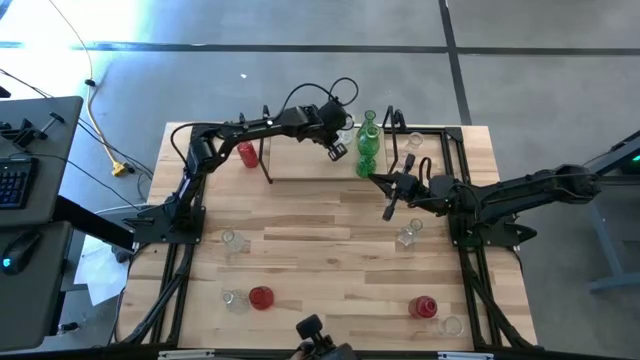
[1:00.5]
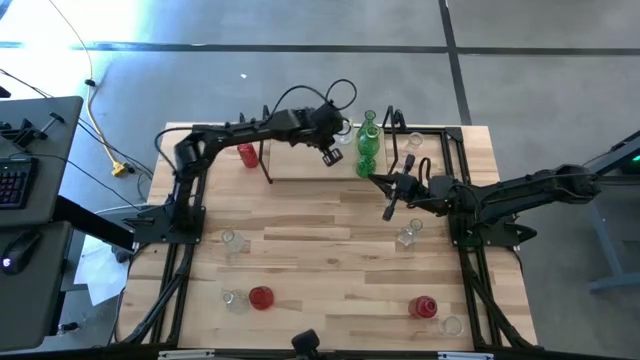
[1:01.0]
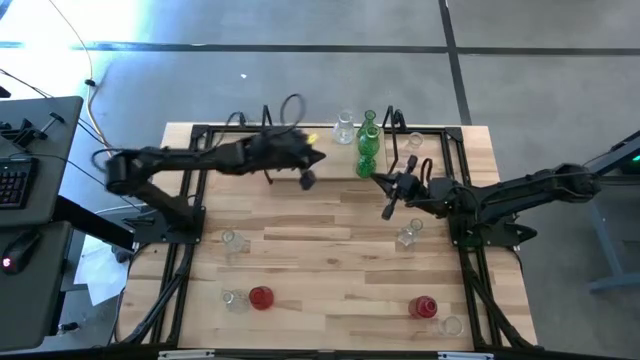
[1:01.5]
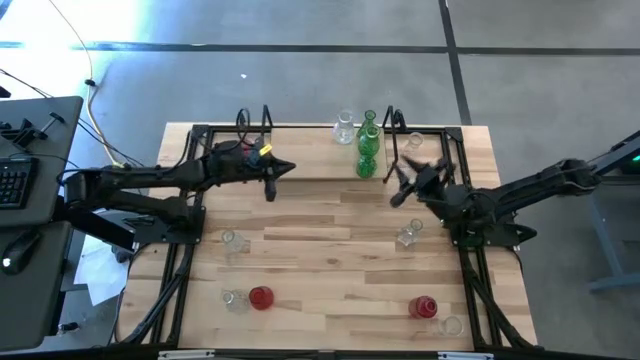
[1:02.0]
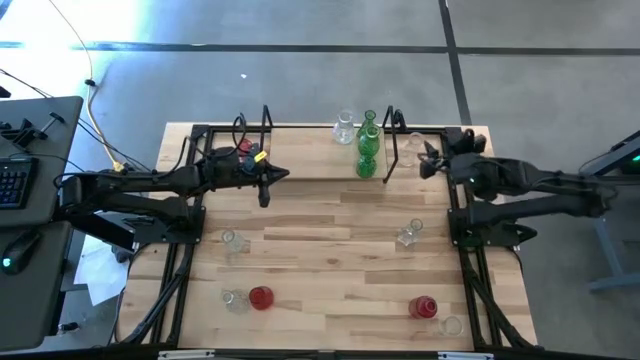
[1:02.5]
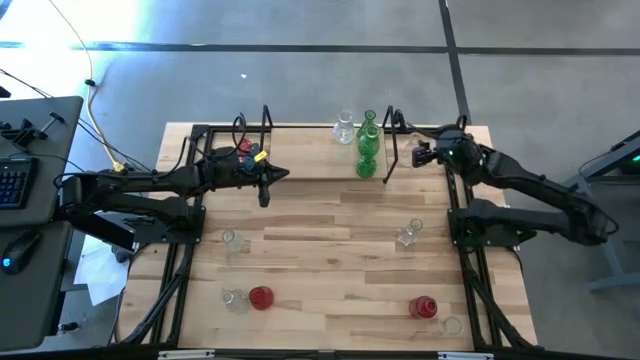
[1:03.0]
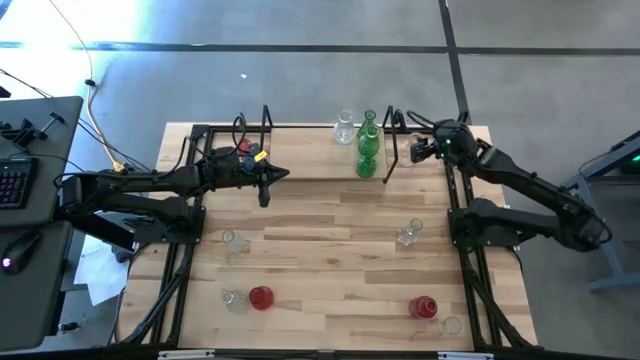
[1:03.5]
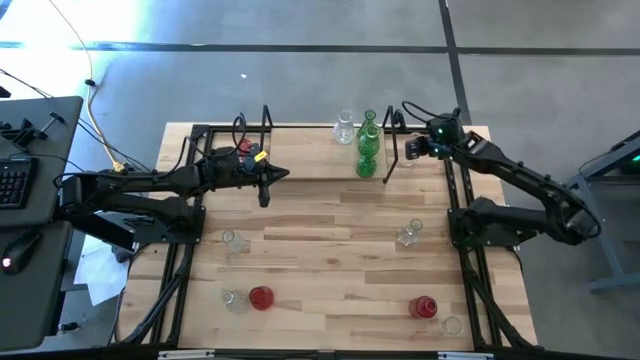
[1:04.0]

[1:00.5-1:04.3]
Task: sort vases onto shelf
Put the top right transparent vase on the shelf

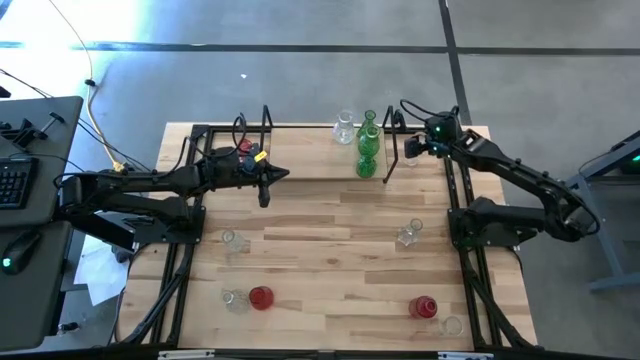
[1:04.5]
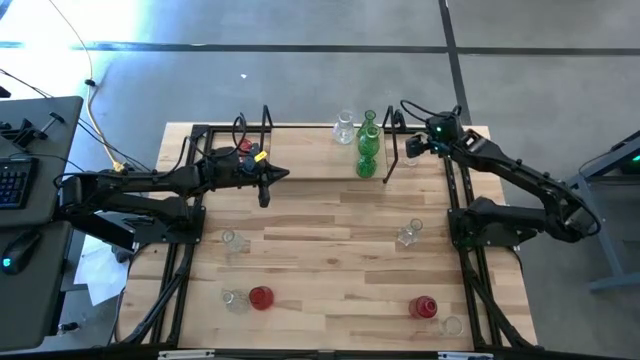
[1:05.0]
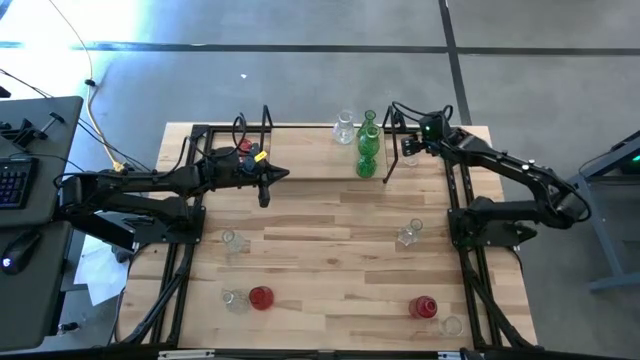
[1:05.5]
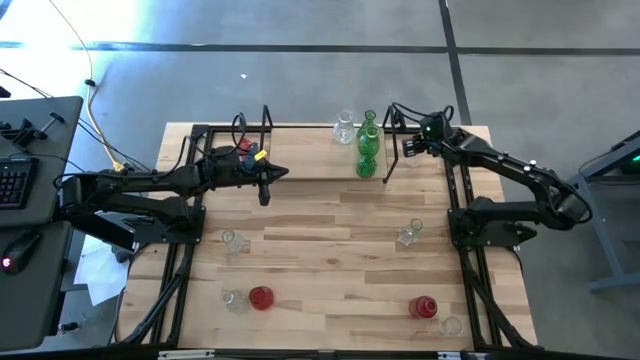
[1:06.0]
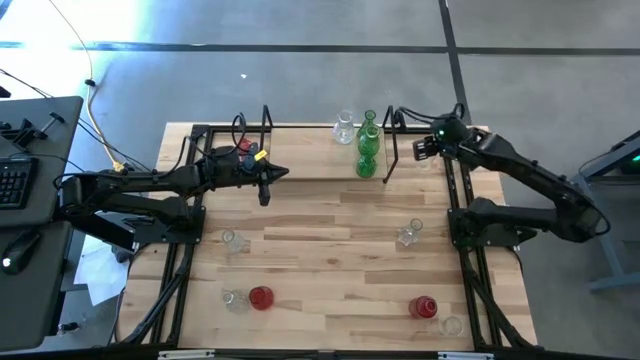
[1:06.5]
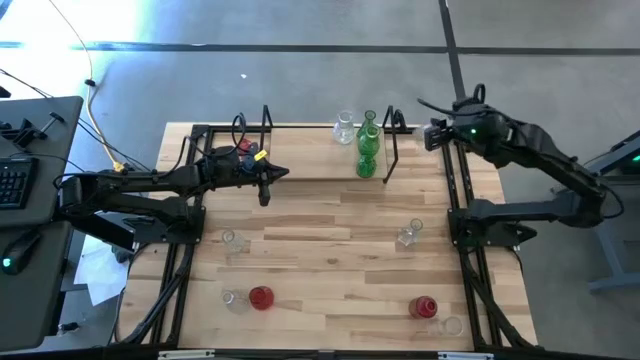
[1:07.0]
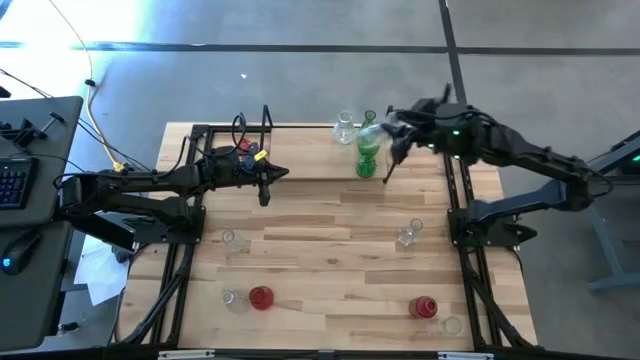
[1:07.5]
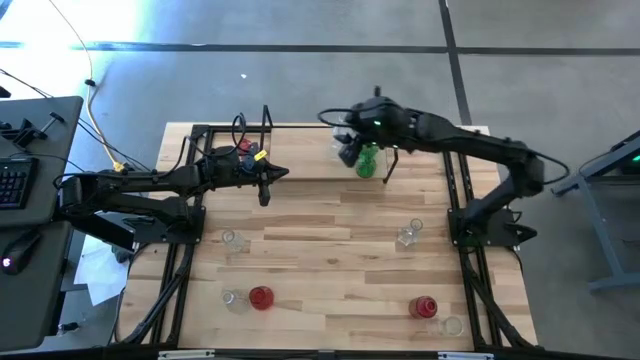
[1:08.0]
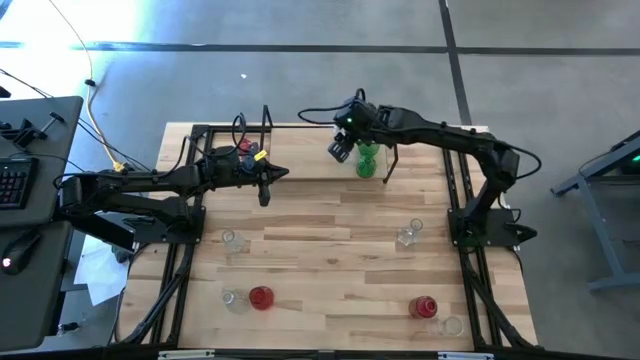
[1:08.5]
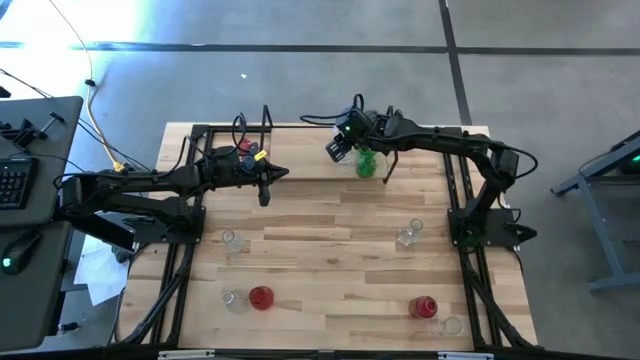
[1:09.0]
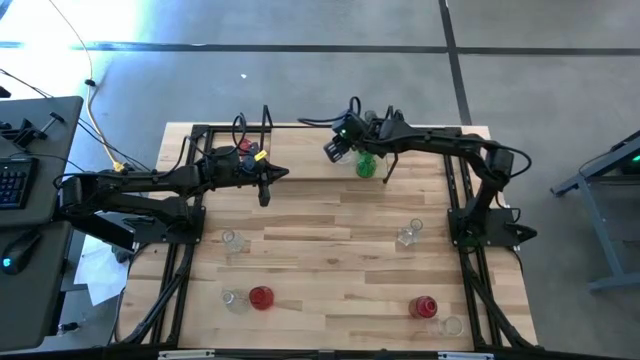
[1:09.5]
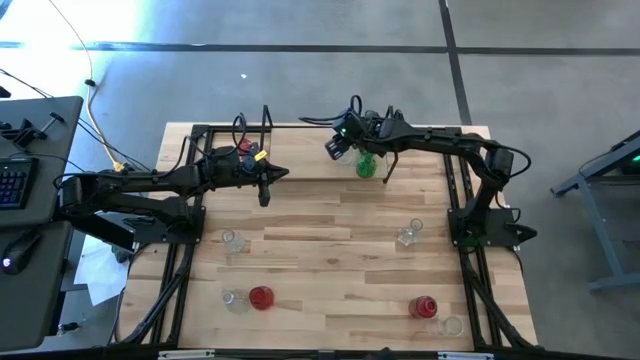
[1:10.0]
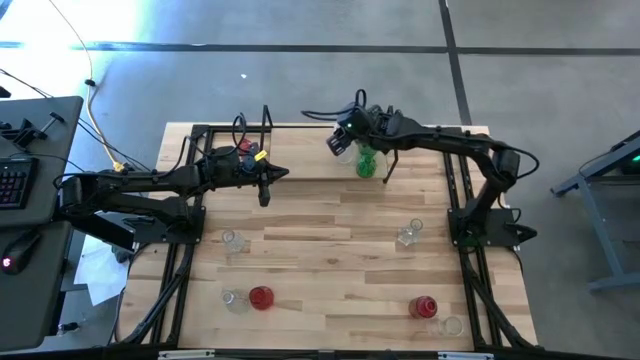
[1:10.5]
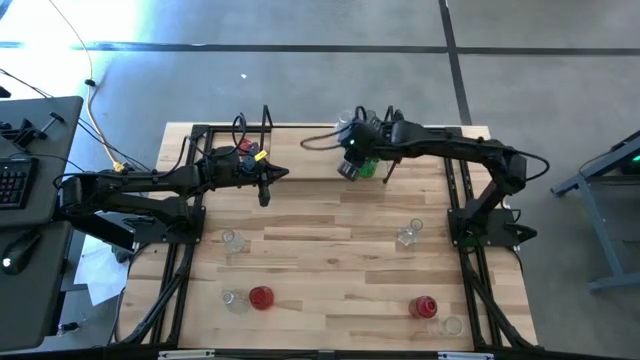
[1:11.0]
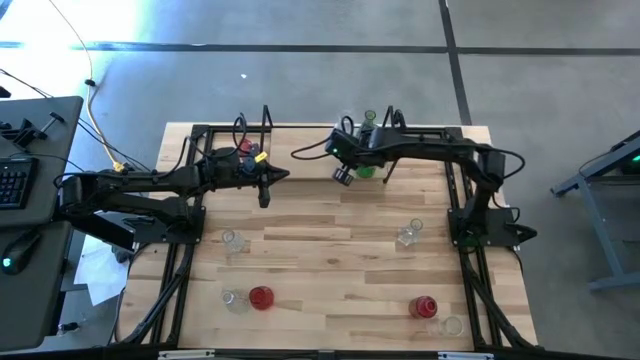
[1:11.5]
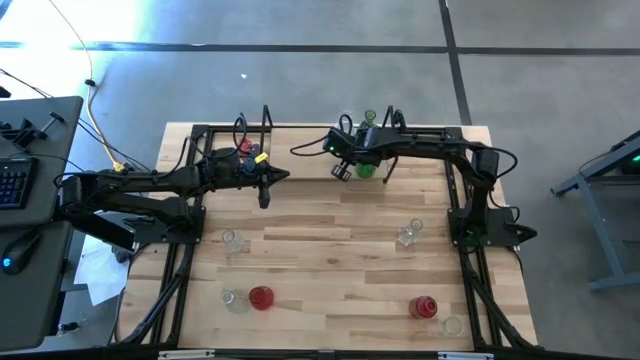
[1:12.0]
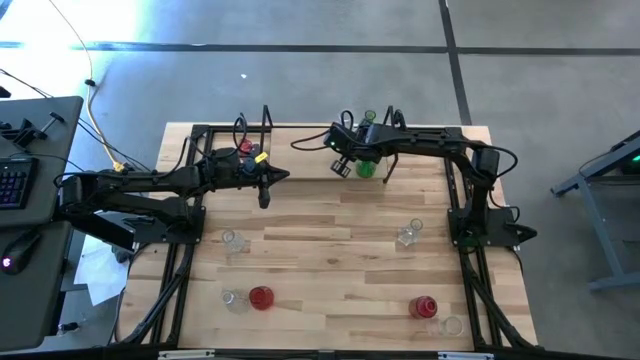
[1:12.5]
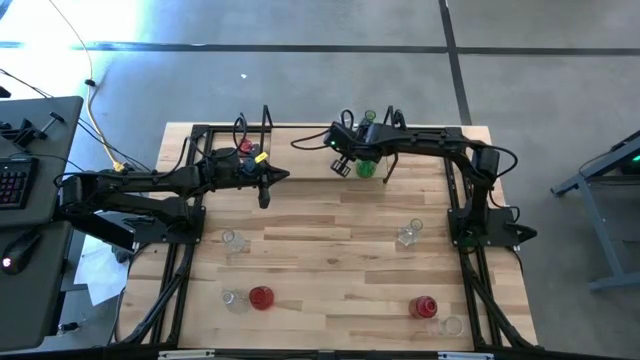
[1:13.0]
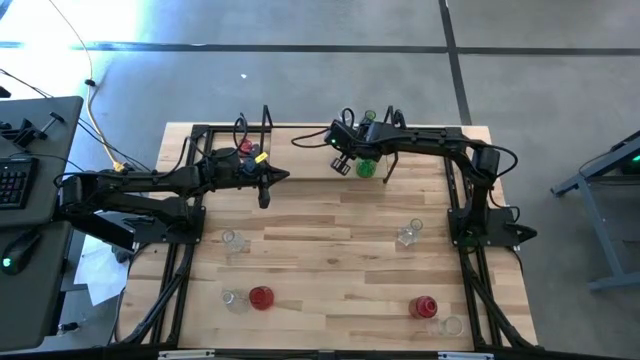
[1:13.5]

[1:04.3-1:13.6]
Put the top right transparent vase aligned with the other transparent vase on the shelf
